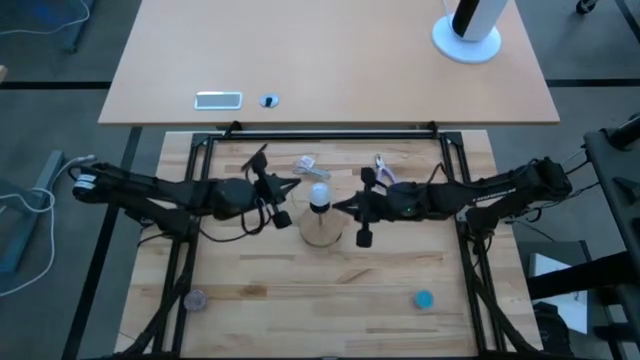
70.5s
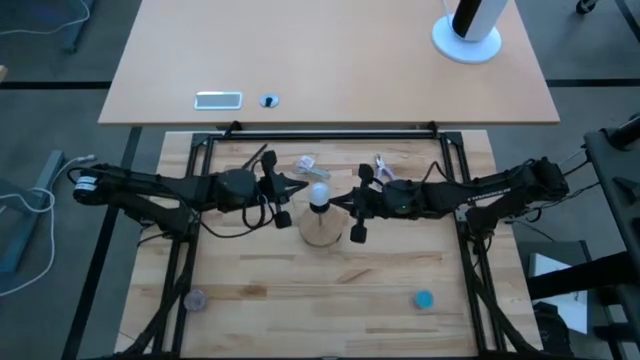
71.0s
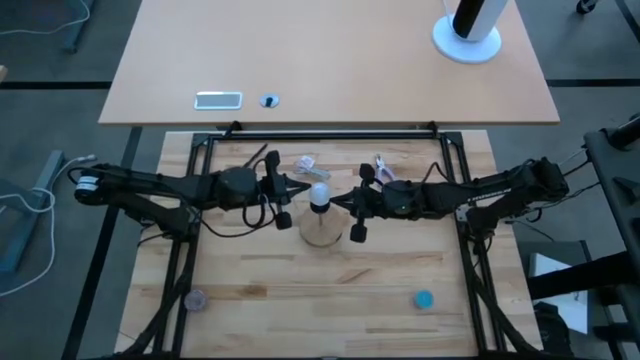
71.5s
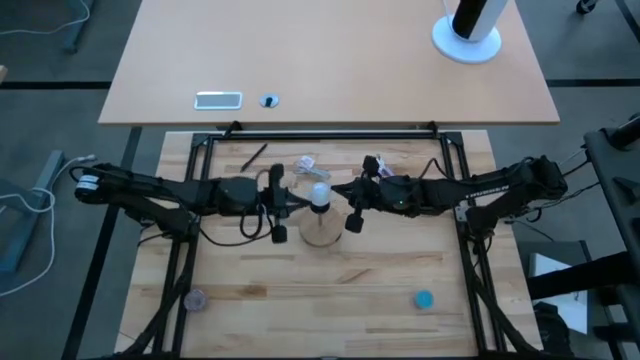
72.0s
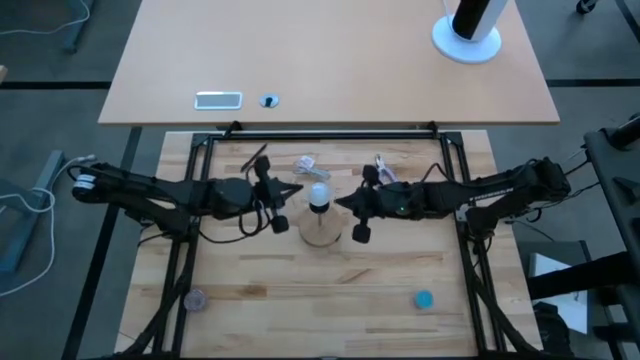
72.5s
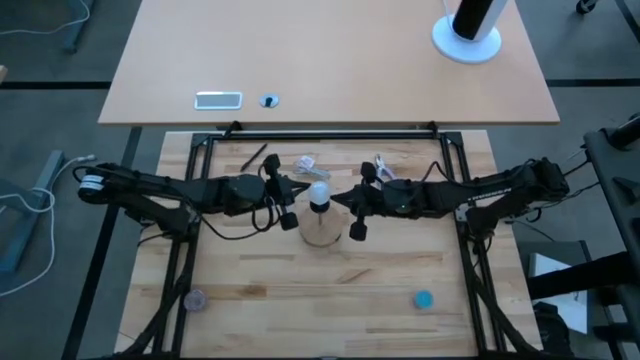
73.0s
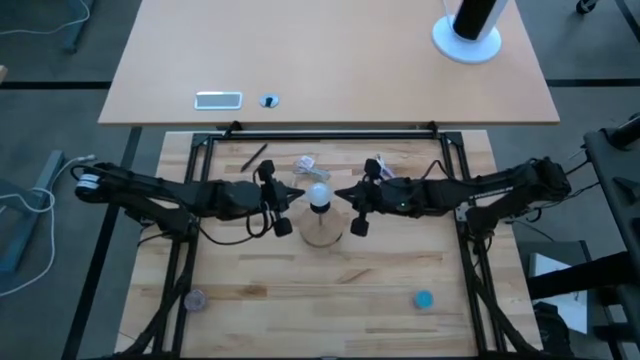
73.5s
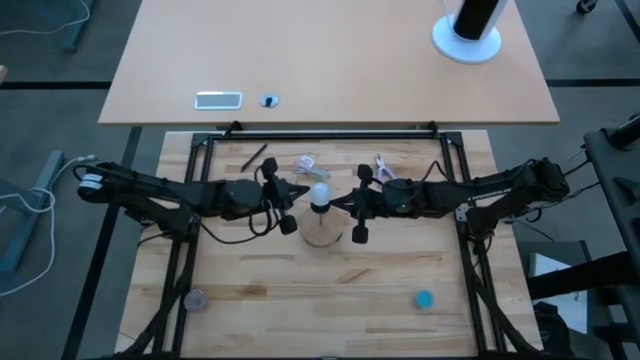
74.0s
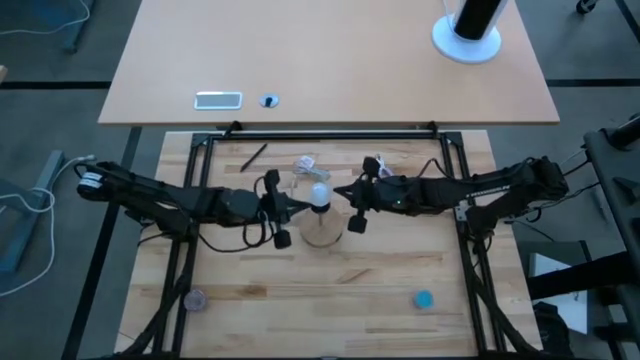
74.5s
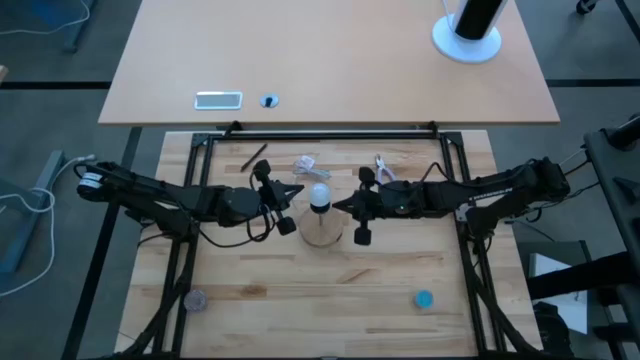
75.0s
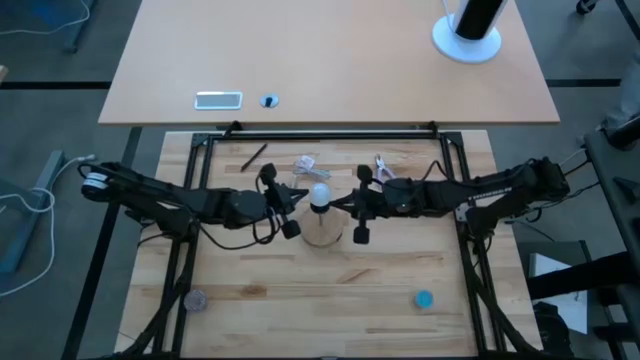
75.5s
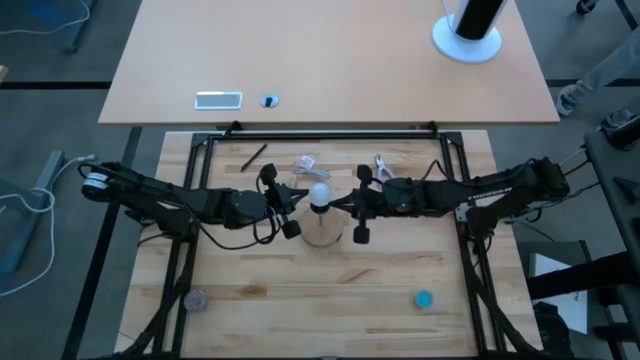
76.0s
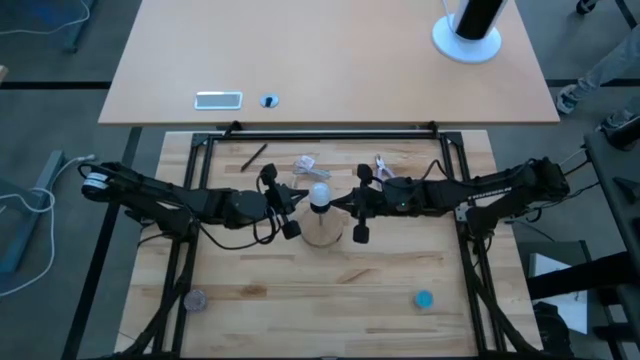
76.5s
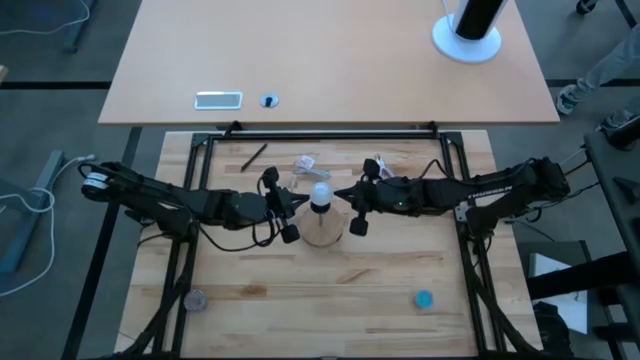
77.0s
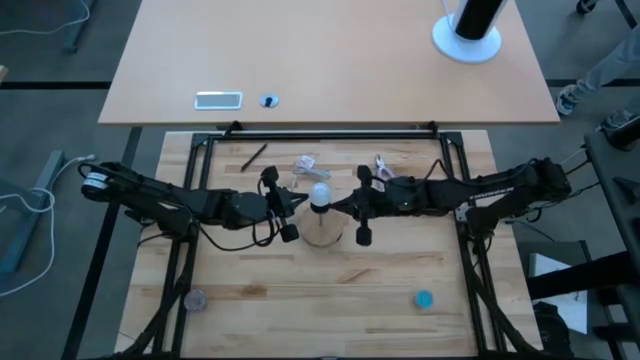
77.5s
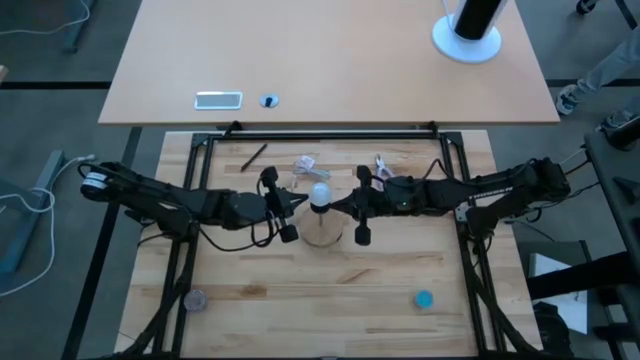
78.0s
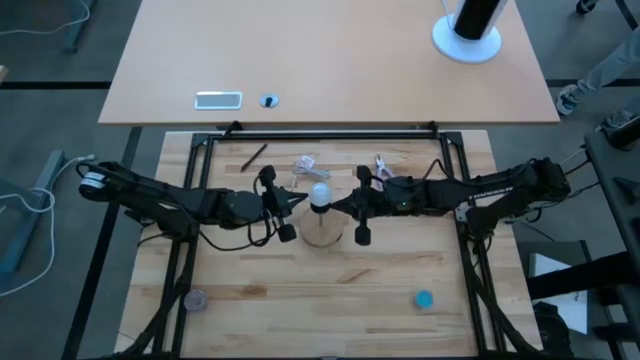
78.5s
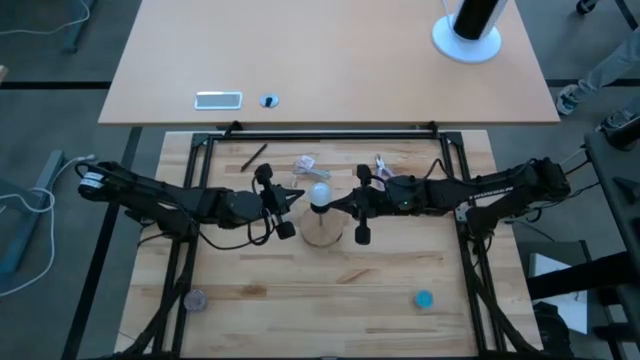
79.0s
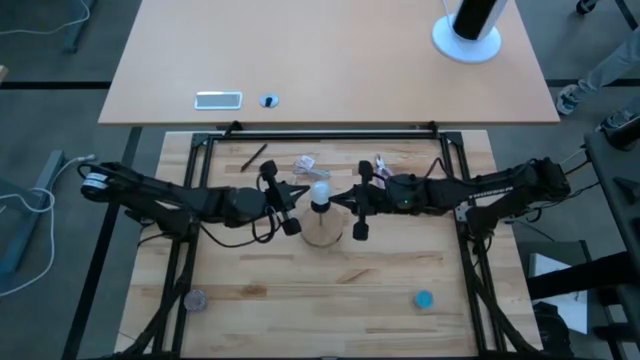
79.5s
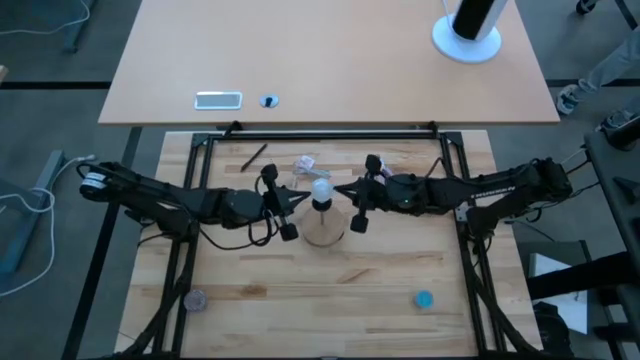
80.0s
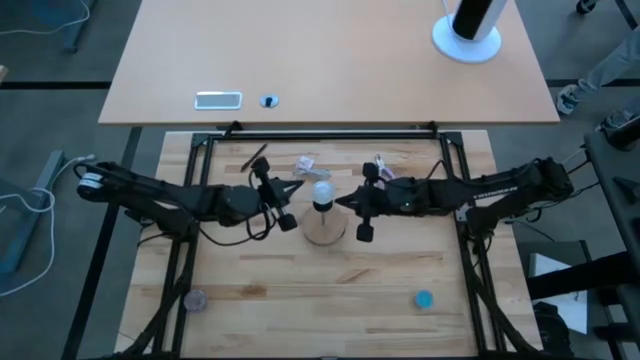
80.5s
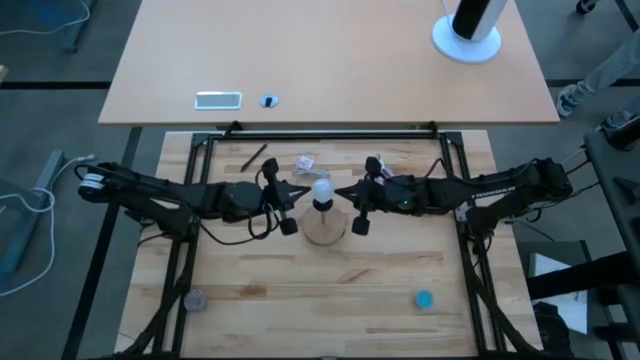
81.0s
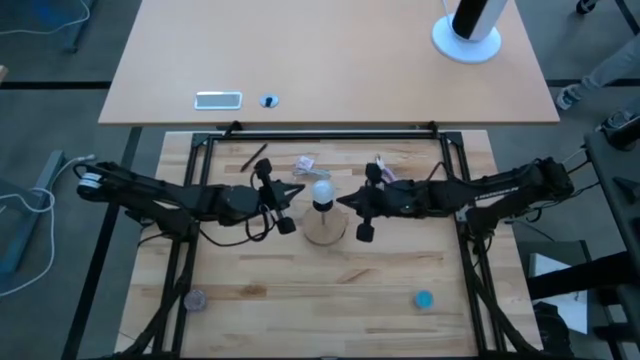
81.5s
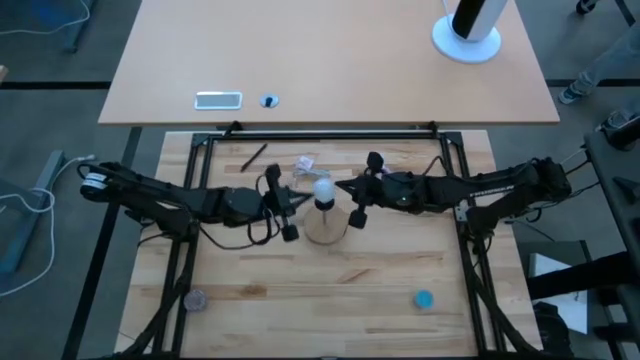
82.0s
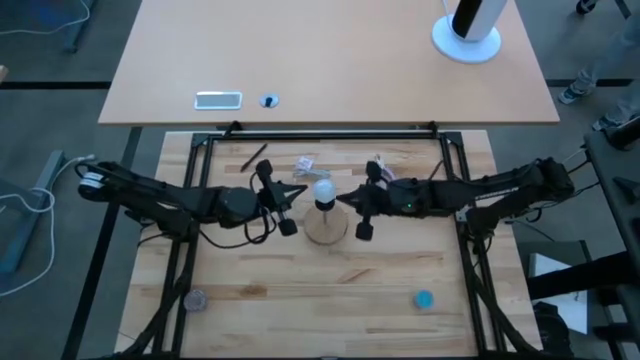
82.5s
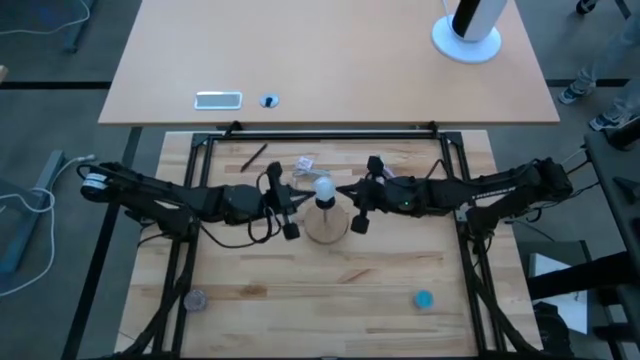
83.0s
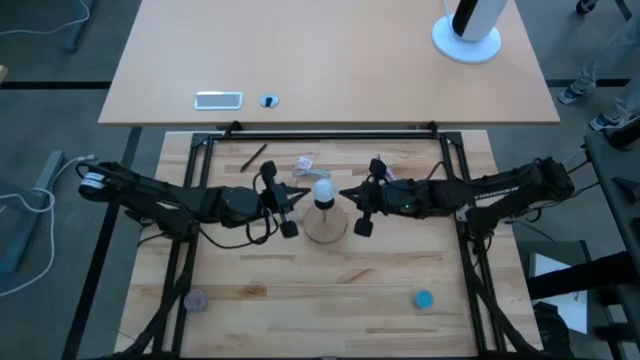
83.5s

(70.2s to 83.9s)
Task: Screw lightbulb
Remove the lightbulb from the brown lamp

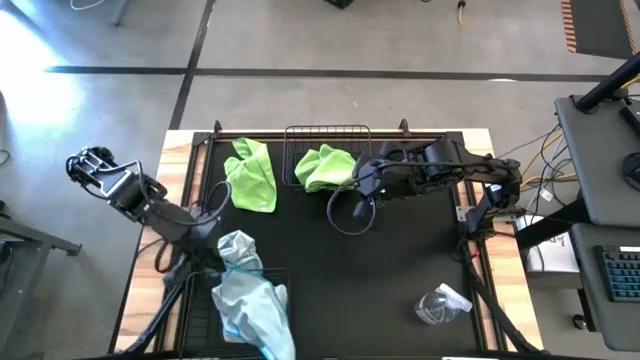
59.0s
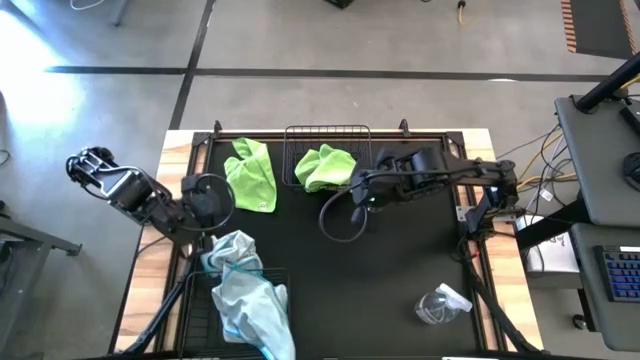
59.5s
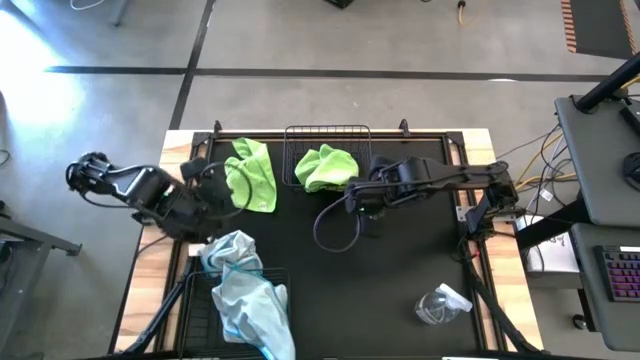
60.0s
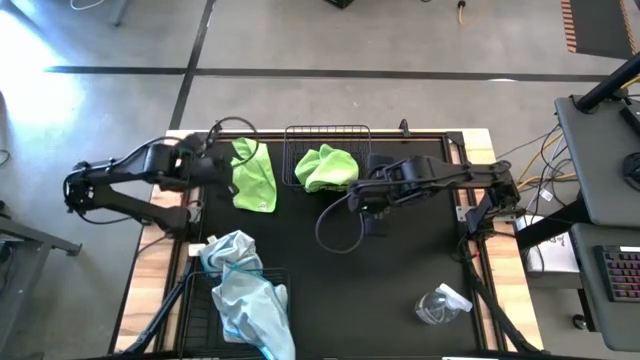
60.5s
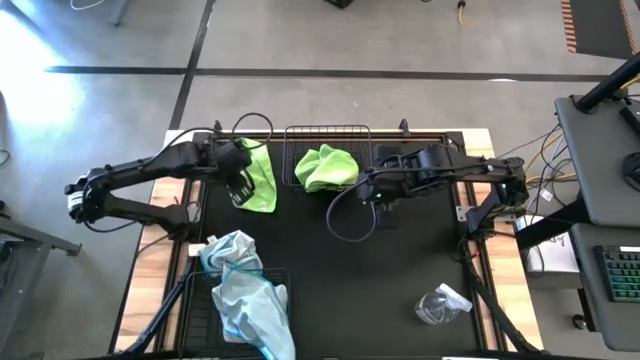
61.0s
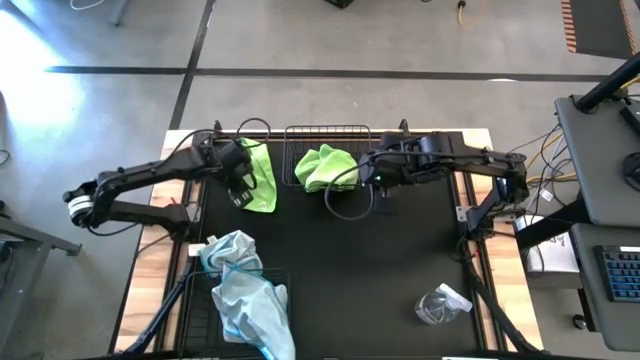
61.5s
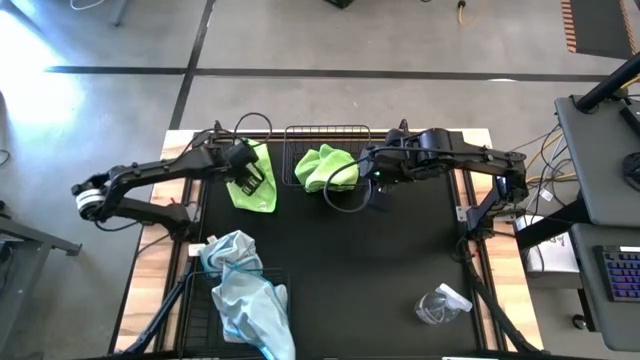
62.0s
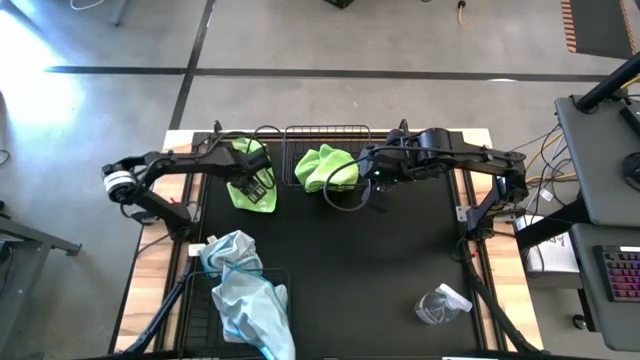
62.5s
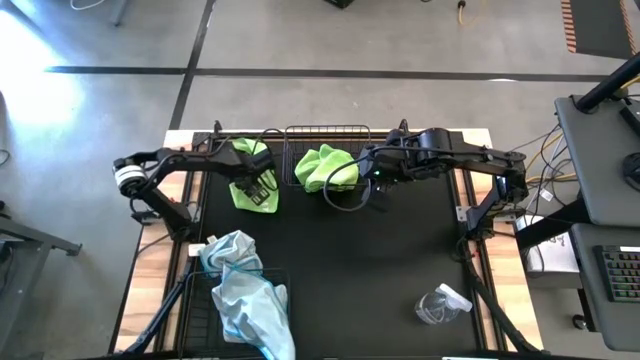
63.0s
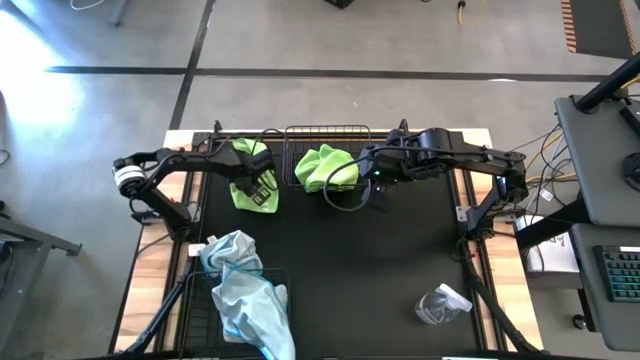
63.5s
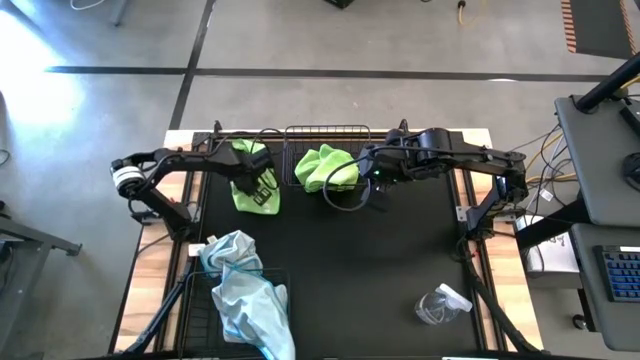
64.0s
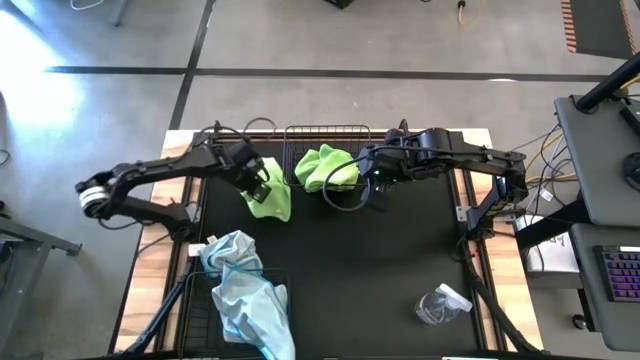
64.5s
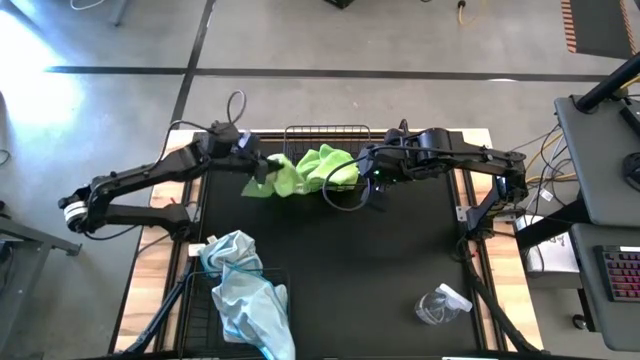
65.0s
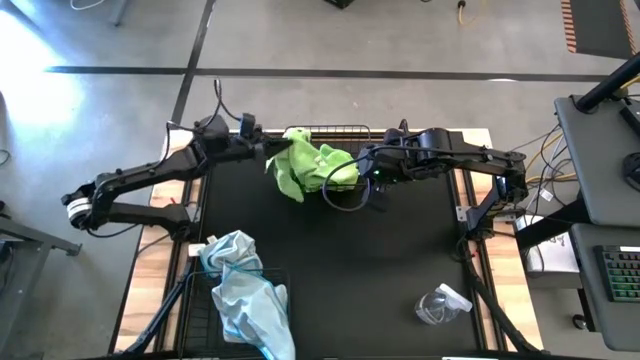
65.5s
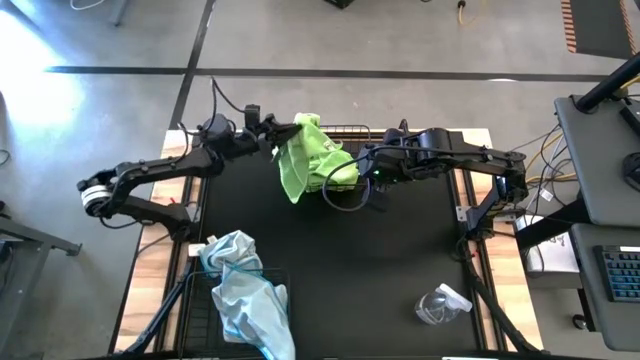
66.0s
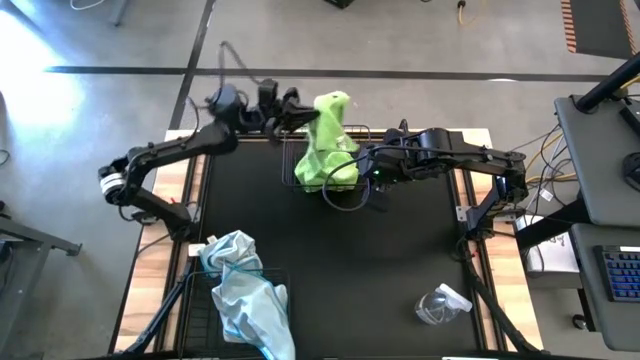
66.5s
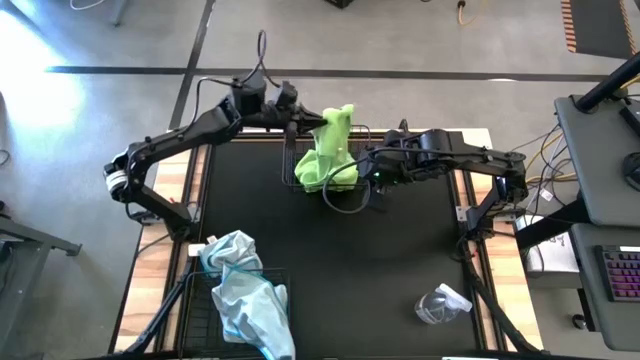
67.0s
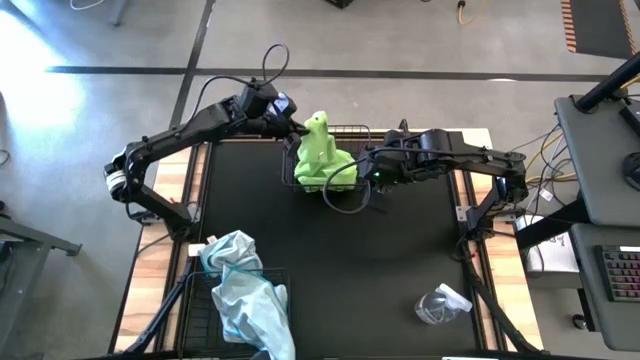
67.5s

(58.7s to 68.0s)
Task: Sort microfiber towel by color & place in baskets
Put the green microfiber towel into the top black wire basket
